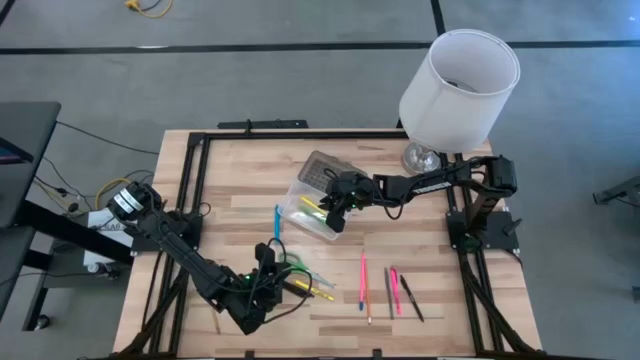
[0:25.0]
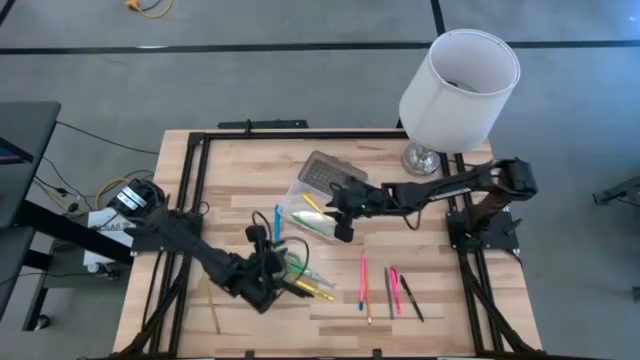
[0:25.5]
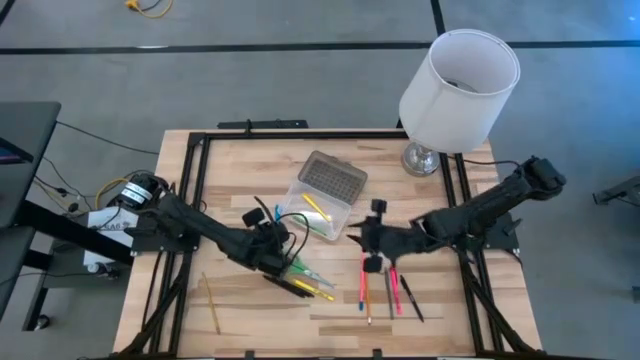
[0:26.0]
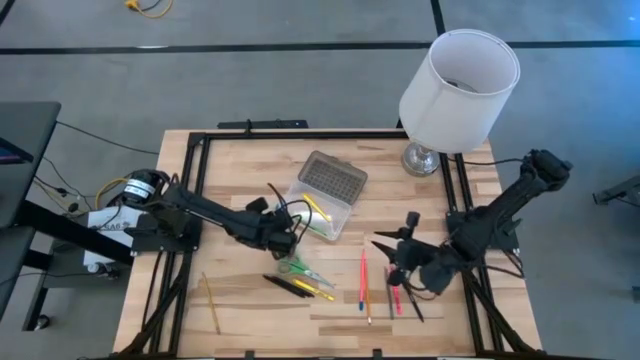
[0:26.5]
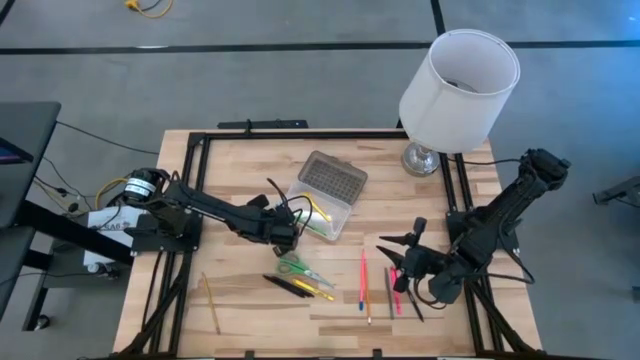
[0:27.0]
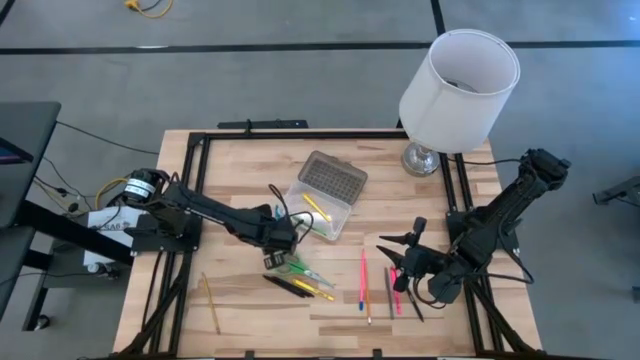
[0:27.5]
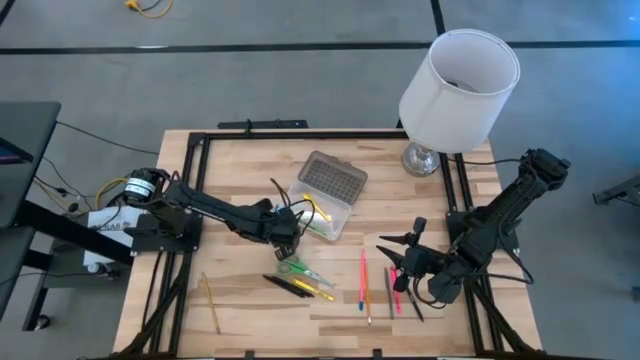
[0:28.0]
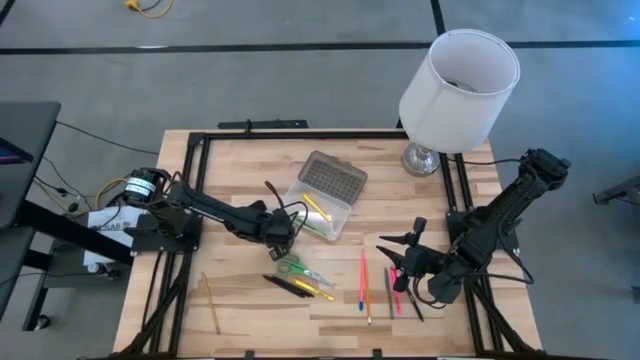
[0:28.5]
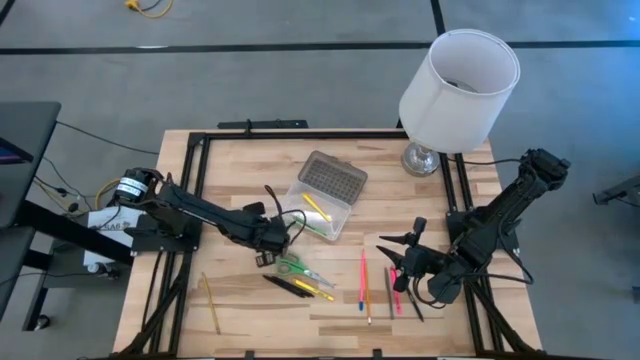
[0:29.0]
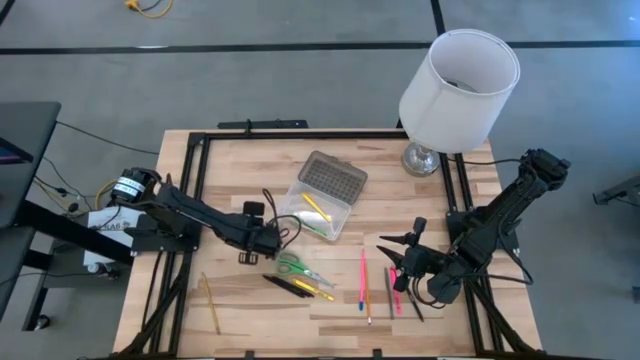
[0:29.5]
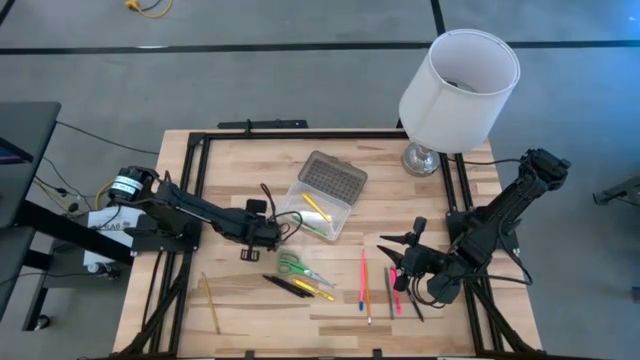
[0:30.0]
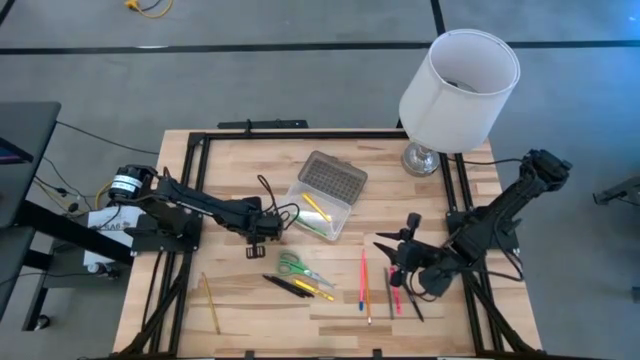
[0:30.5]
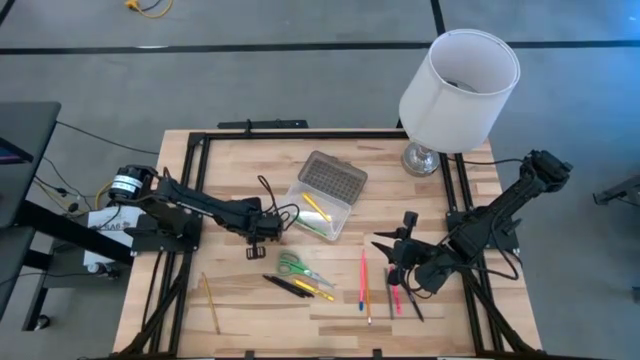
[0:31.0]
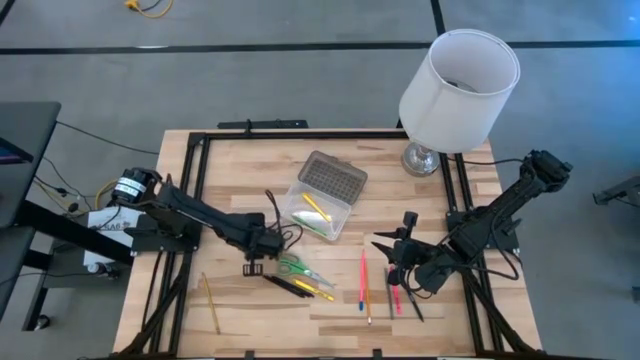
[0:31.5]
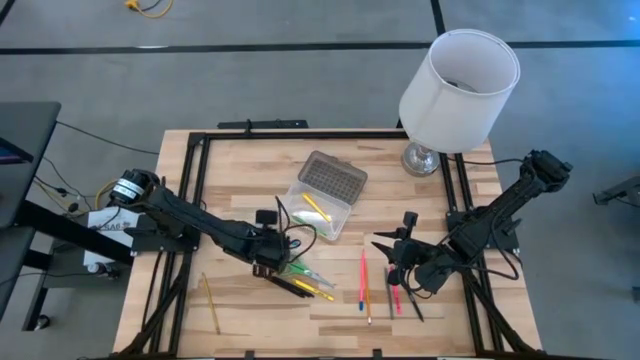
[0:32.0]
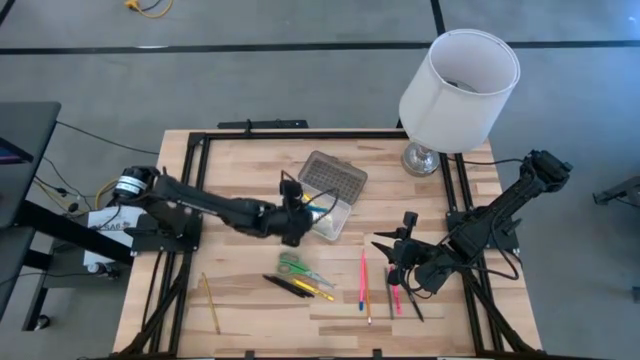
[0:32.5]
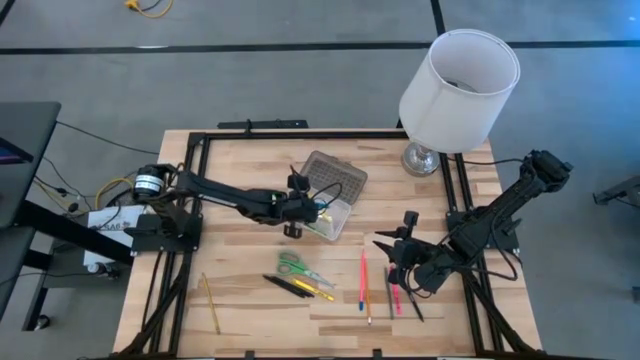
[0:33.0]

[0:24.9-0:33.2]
Task: Pick & place school supplies into a supply box
Put the blue pen into the gray supply box

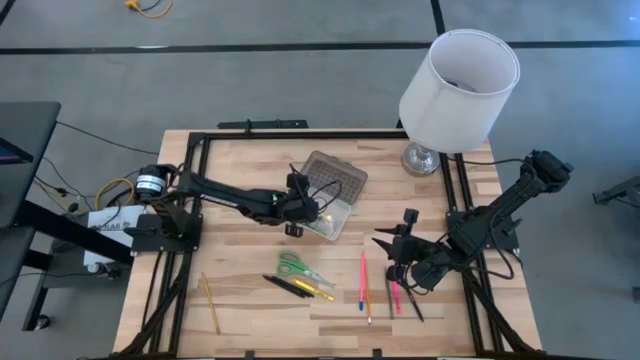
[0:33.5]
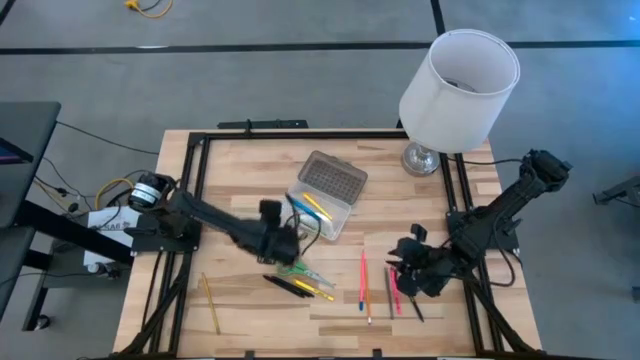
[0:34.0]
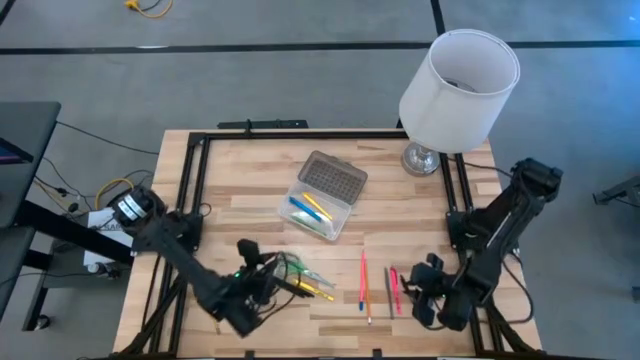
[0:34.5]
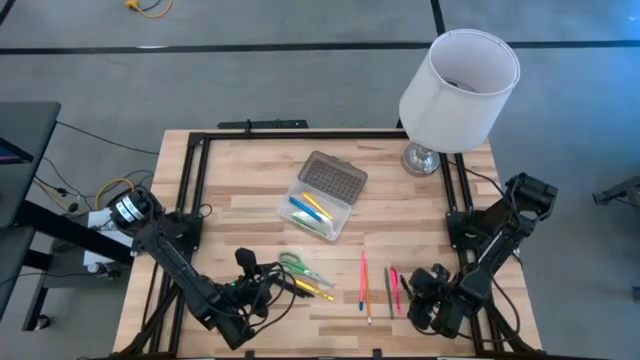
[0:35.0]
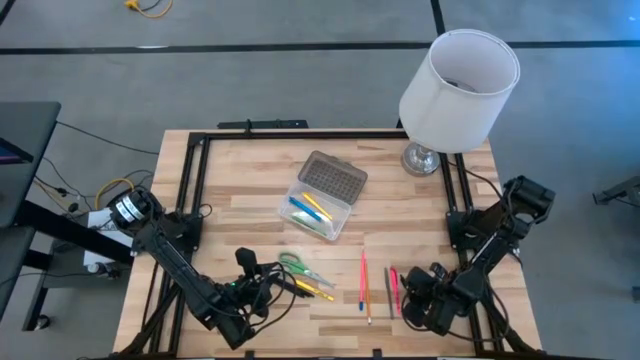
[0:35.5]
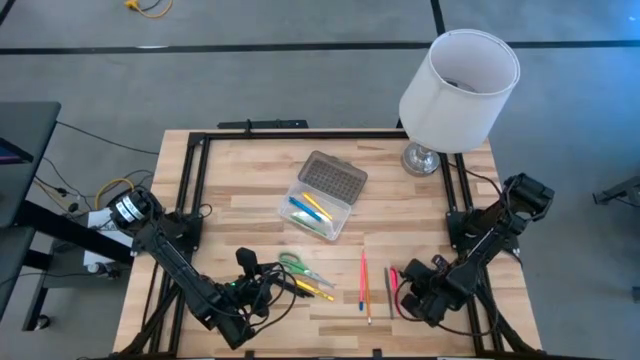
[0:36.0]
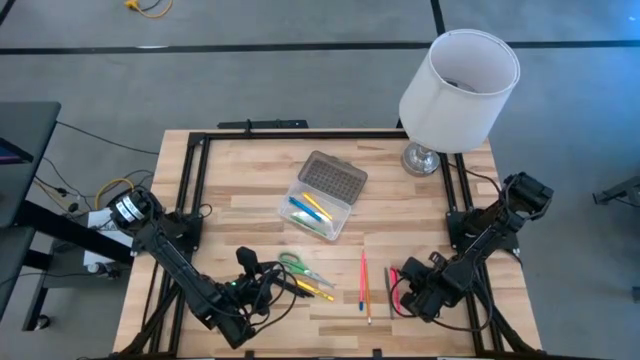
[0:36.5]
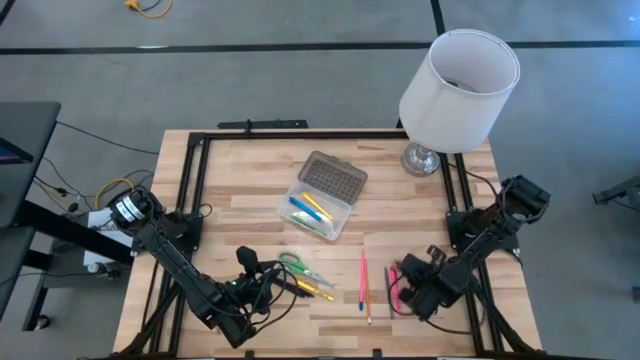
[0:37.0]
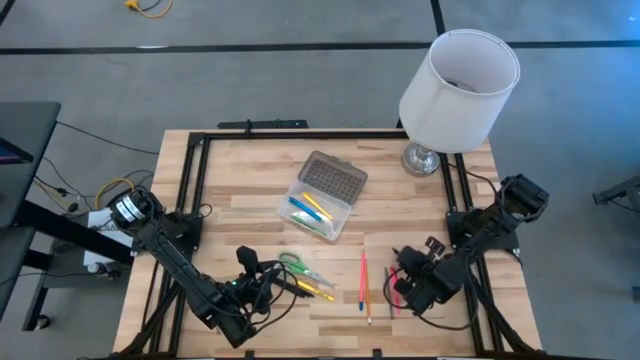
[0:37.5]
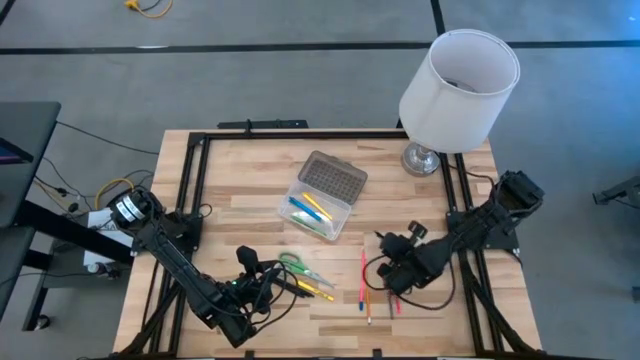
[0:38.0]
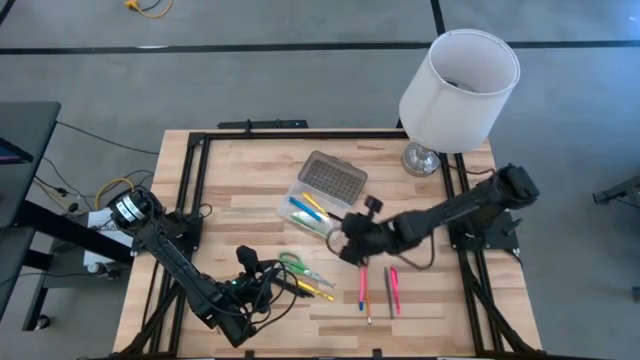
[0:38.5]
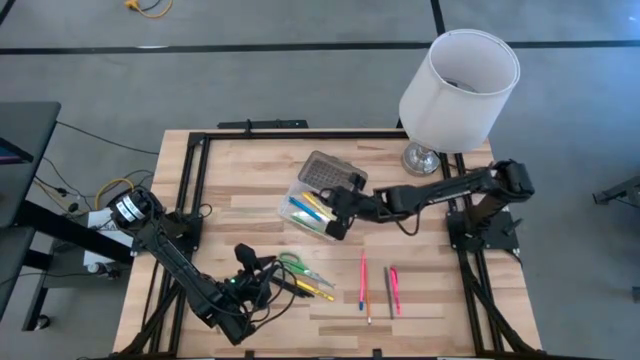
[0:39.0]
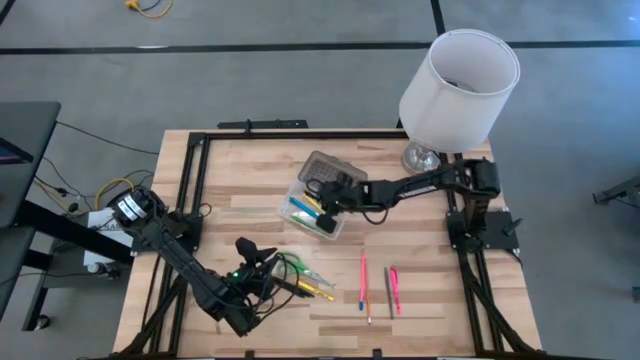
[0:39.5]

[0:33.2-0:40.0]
Put the right black pen into the gray supply box

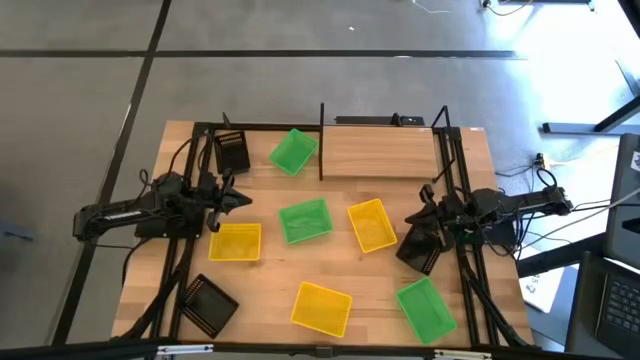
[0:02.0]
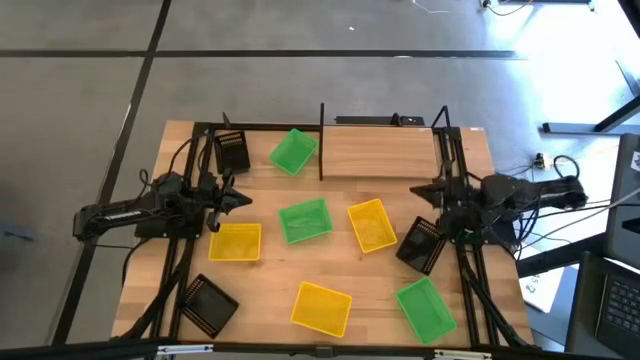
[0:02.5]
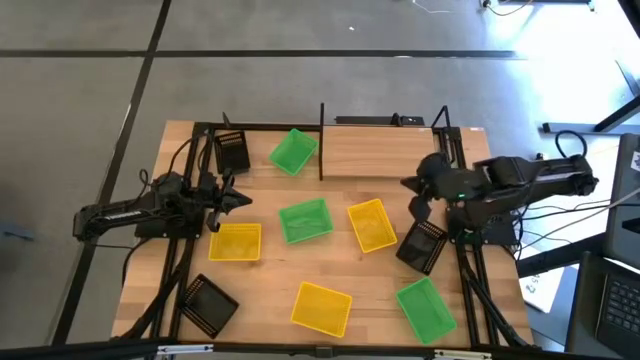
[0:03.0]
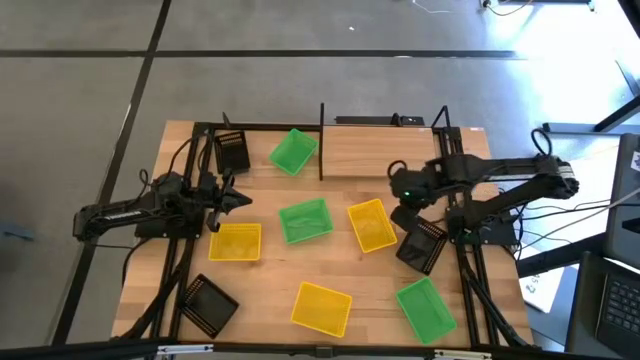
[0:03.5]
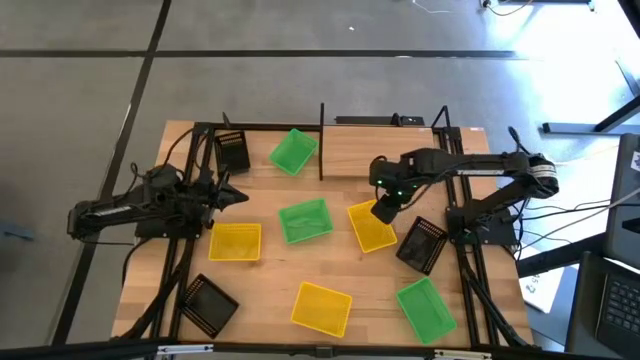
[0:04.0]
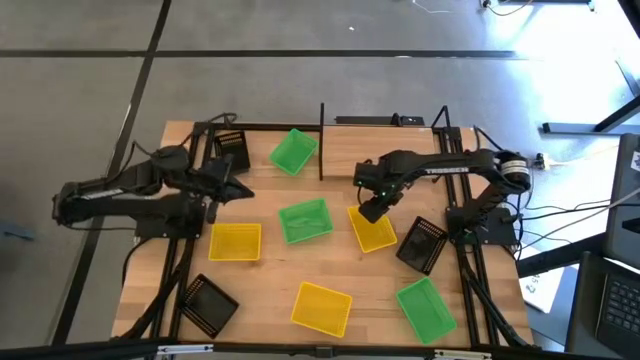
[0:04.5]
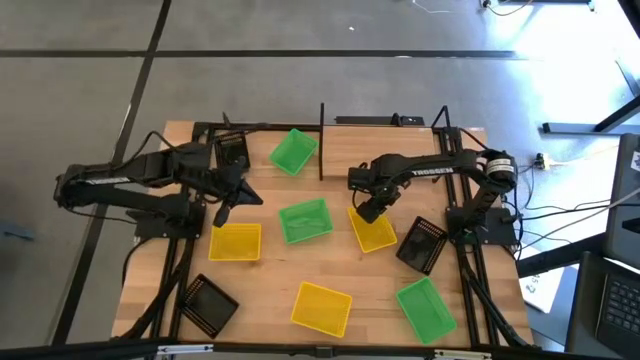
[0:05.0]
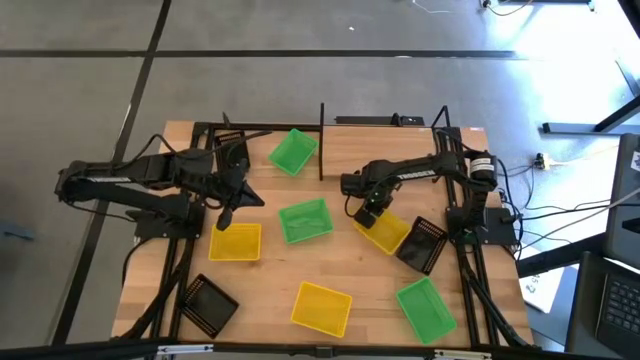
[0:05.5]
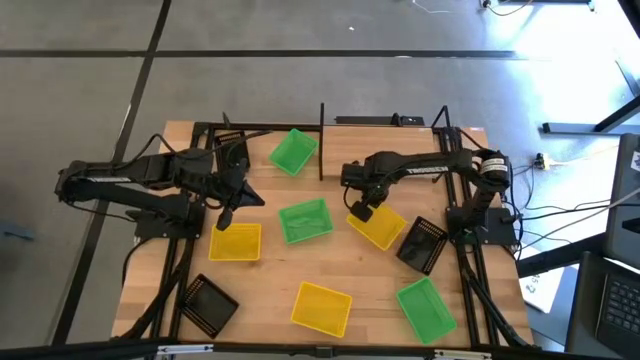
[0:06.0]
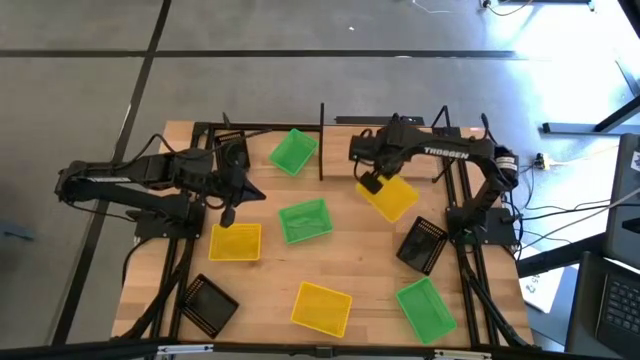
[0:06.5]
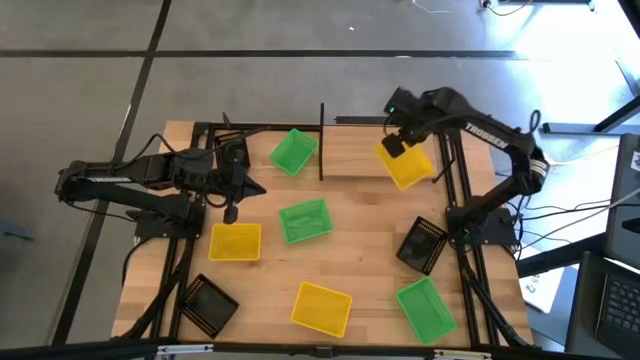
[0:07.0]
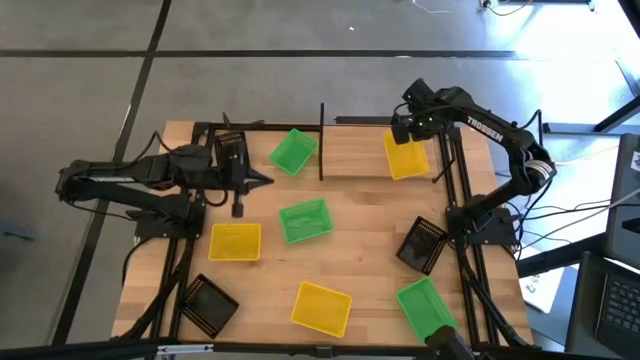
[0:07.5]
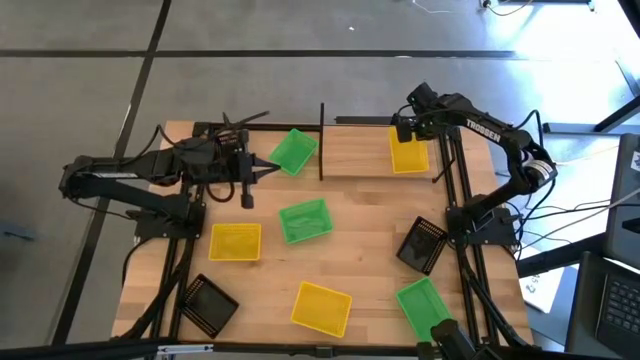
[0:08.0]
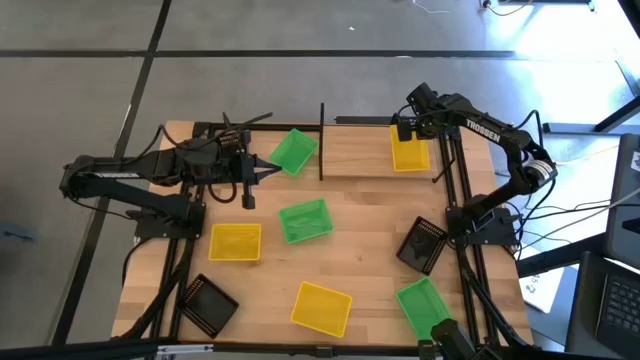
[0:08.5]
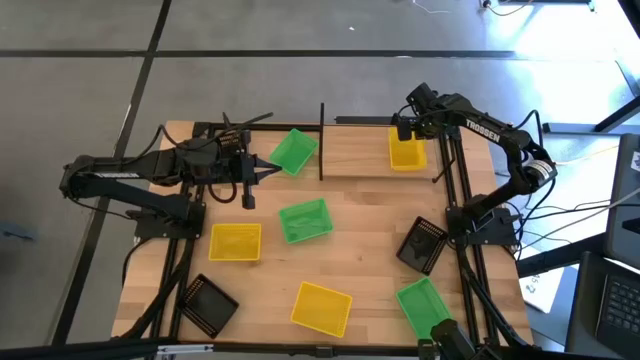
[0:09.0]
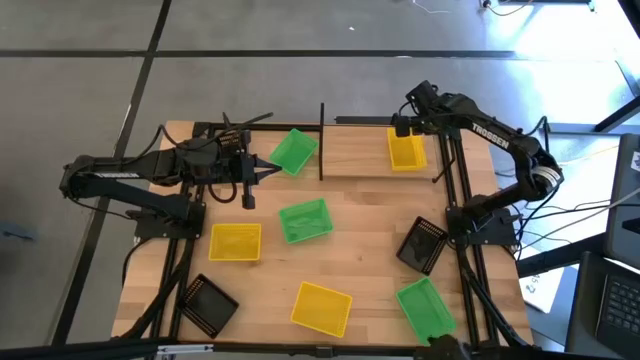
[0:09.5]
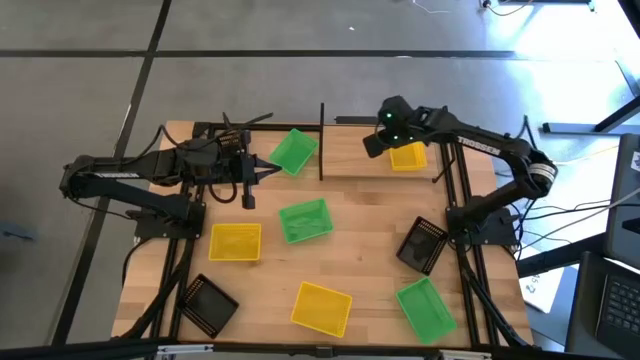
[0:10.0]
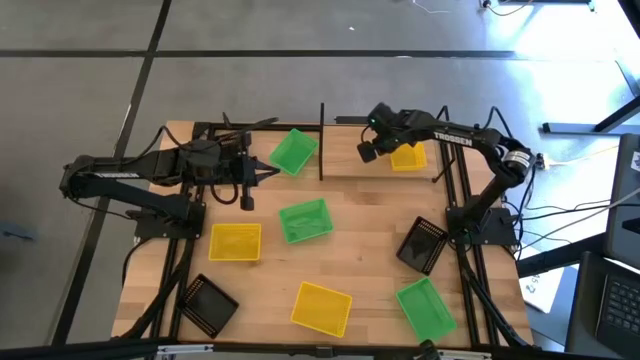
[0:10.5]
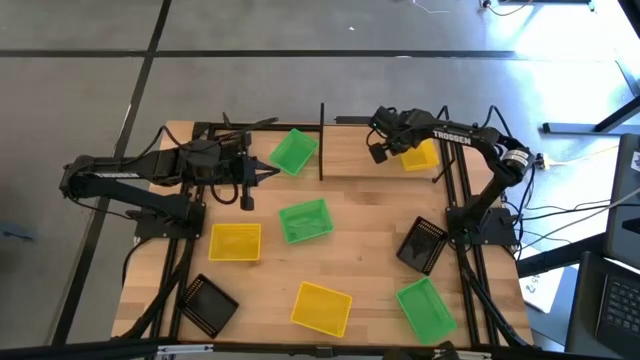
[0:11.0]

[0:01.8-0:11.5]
Task: Stack baskets on shelf by color
Put the top right yellow basket on the shelf
